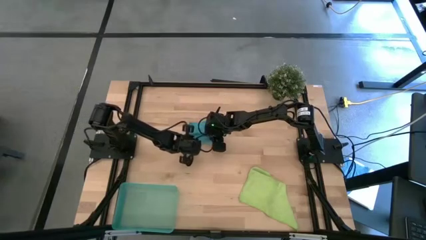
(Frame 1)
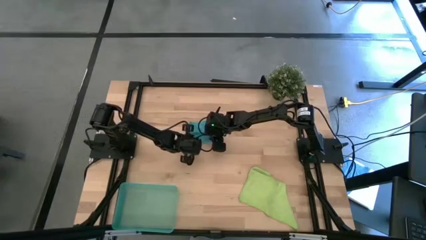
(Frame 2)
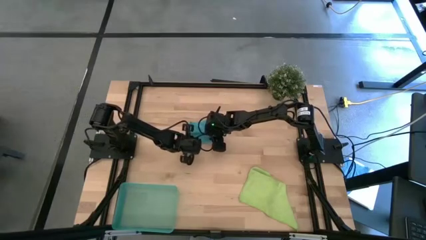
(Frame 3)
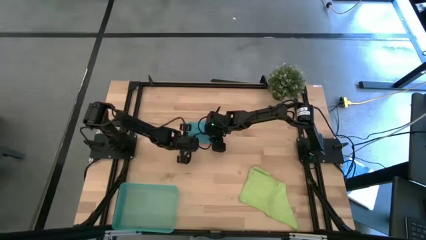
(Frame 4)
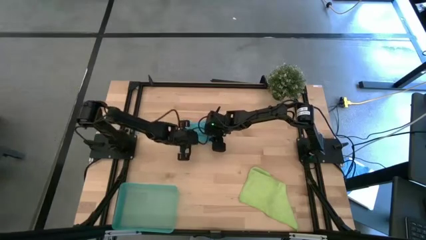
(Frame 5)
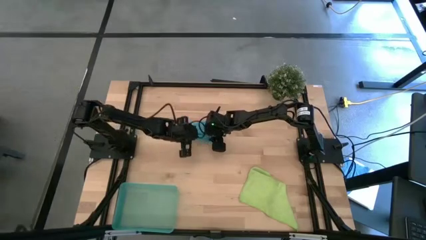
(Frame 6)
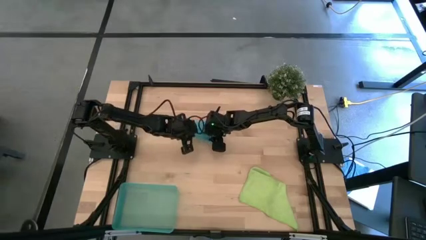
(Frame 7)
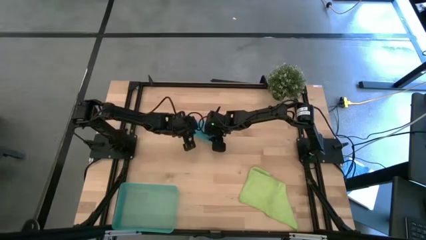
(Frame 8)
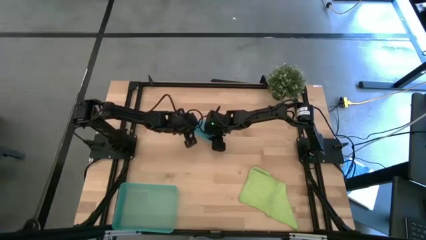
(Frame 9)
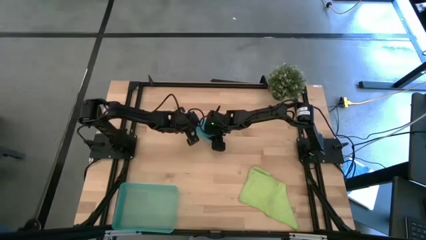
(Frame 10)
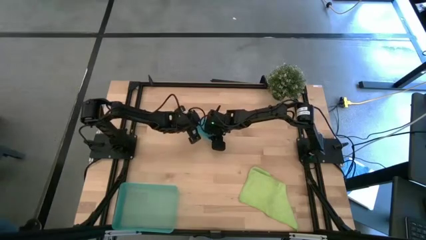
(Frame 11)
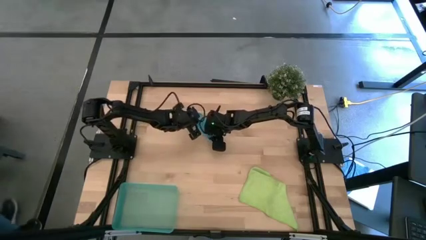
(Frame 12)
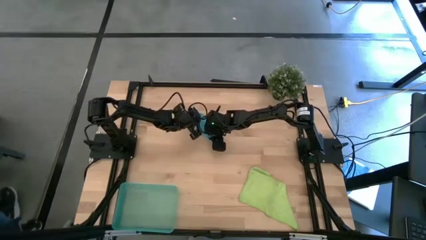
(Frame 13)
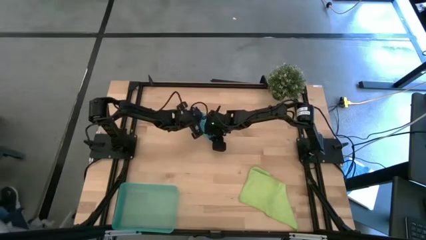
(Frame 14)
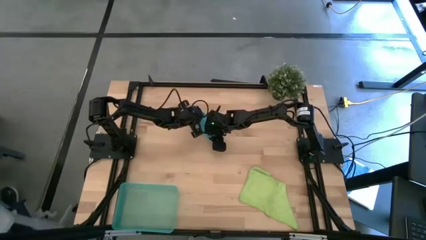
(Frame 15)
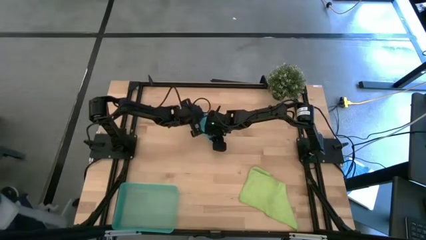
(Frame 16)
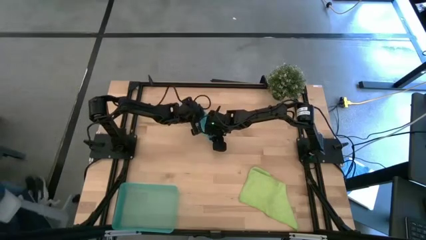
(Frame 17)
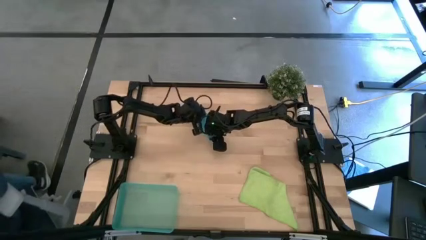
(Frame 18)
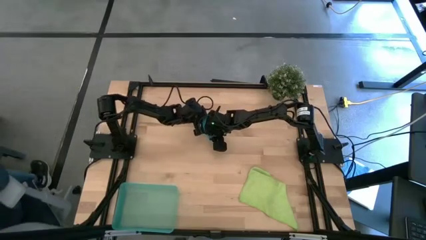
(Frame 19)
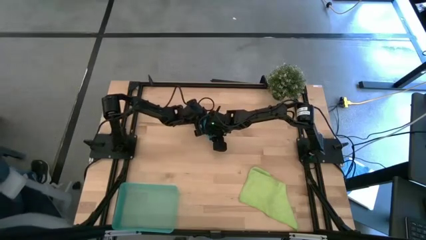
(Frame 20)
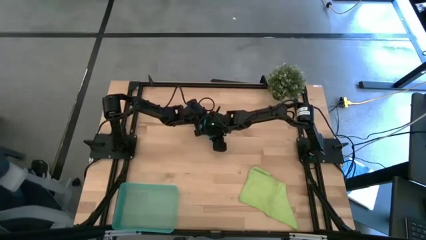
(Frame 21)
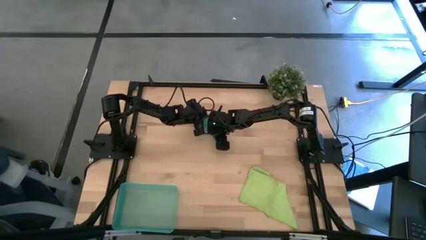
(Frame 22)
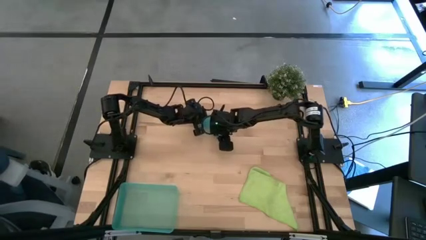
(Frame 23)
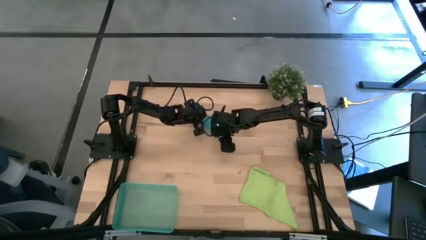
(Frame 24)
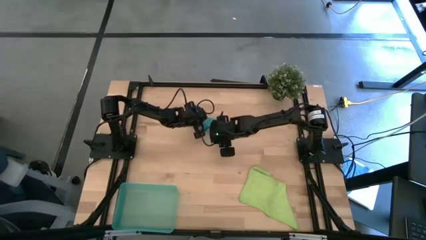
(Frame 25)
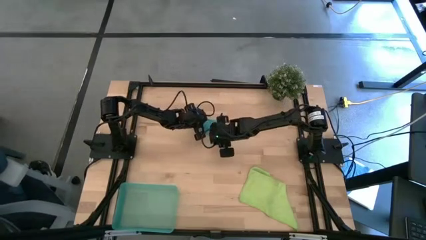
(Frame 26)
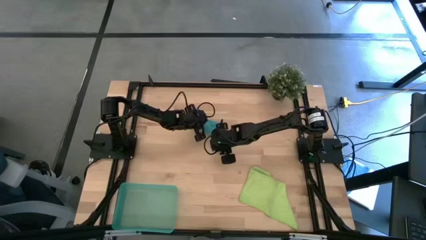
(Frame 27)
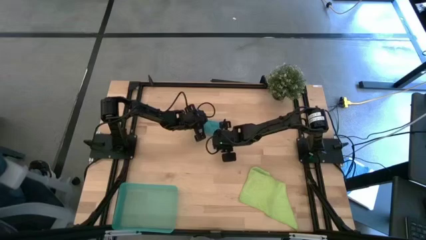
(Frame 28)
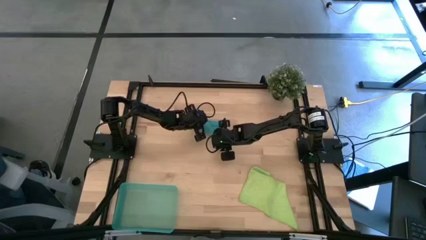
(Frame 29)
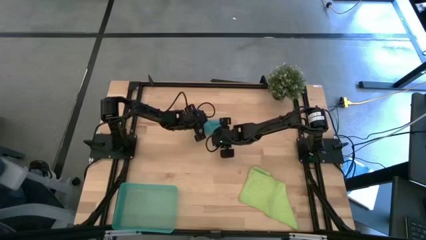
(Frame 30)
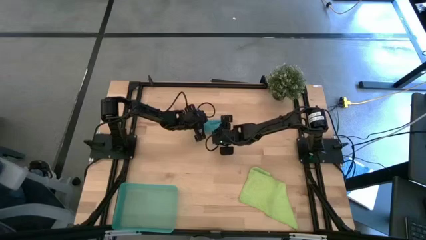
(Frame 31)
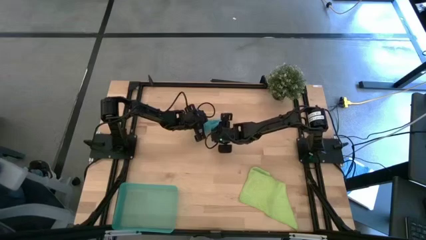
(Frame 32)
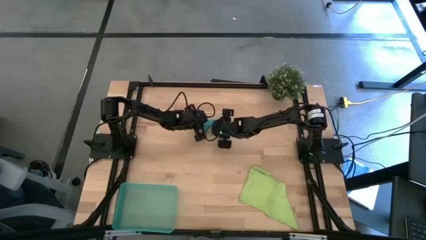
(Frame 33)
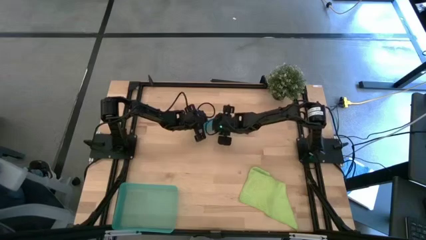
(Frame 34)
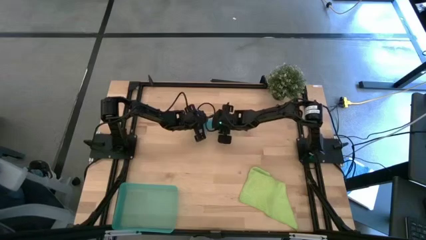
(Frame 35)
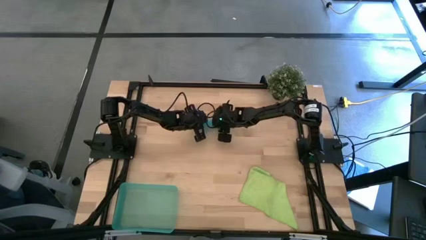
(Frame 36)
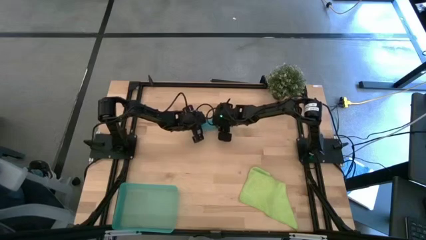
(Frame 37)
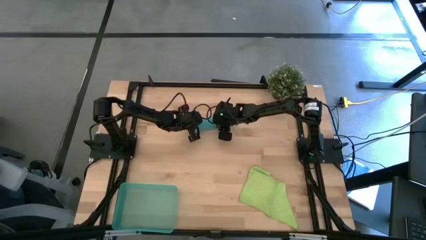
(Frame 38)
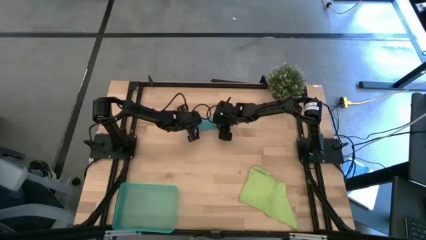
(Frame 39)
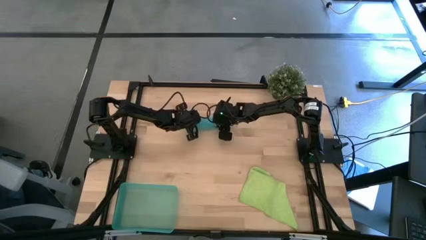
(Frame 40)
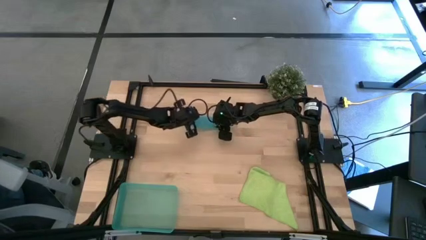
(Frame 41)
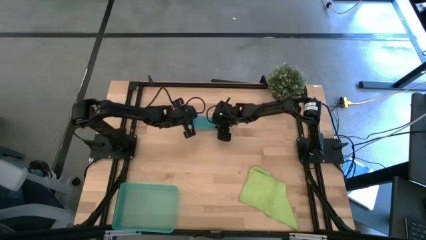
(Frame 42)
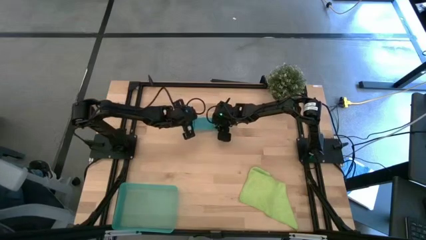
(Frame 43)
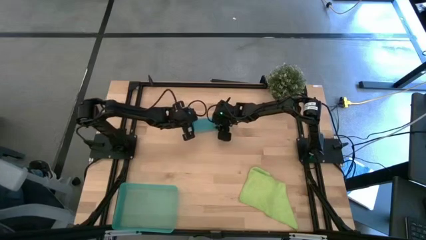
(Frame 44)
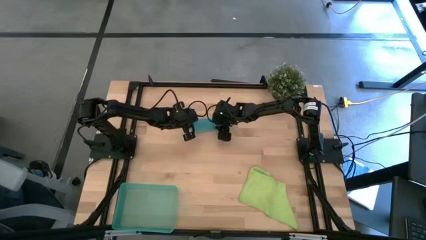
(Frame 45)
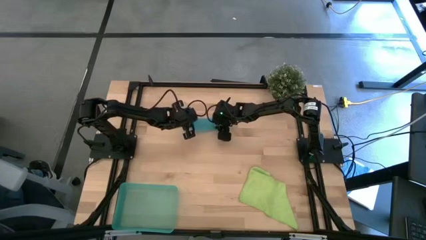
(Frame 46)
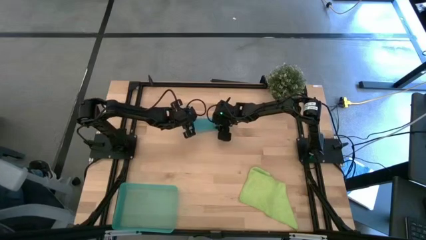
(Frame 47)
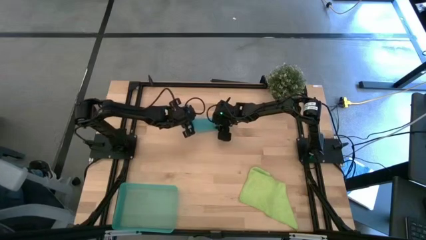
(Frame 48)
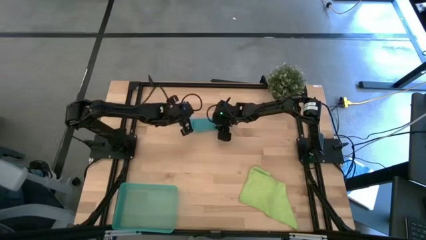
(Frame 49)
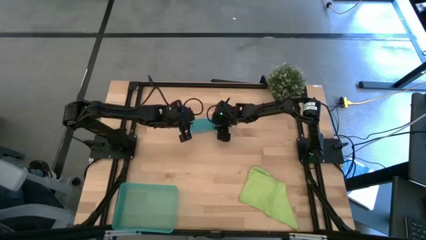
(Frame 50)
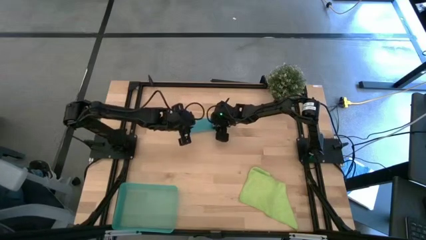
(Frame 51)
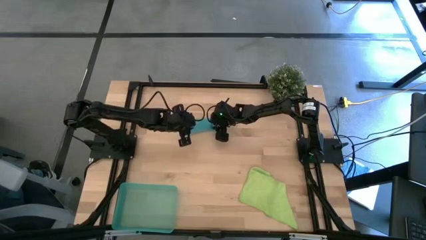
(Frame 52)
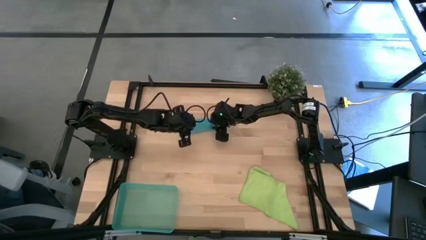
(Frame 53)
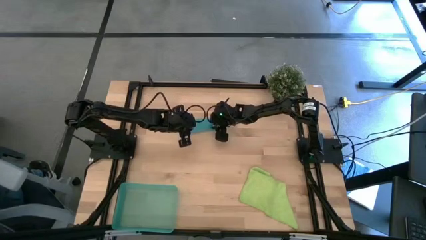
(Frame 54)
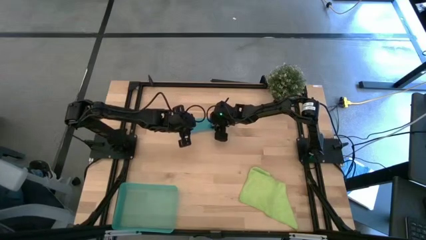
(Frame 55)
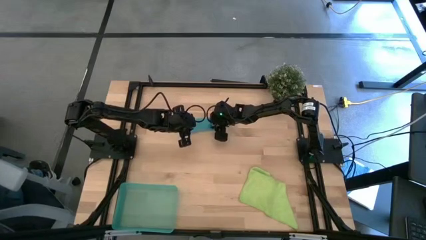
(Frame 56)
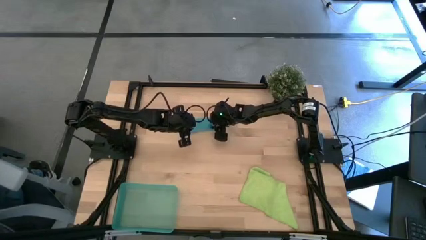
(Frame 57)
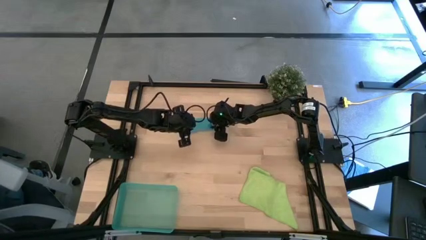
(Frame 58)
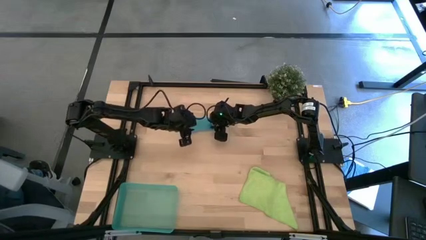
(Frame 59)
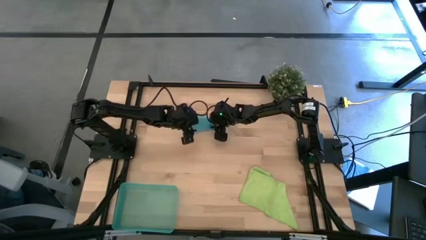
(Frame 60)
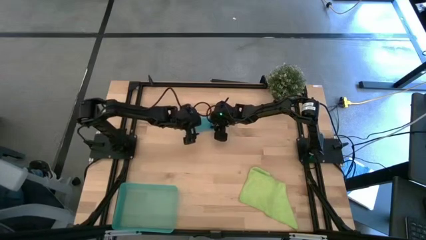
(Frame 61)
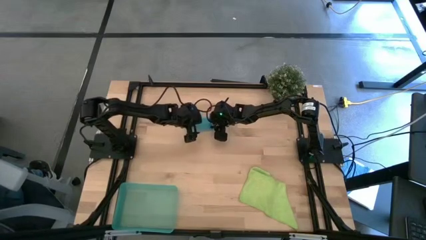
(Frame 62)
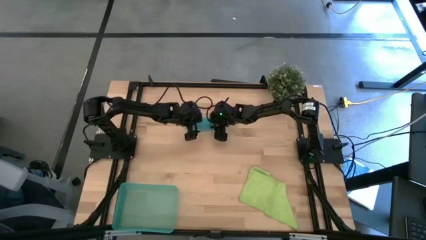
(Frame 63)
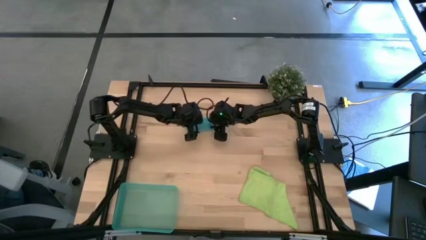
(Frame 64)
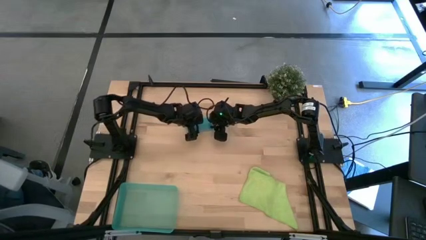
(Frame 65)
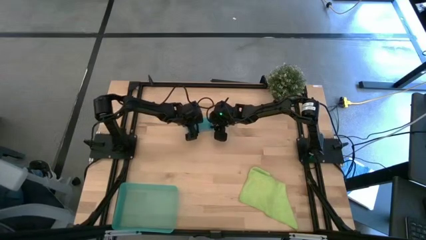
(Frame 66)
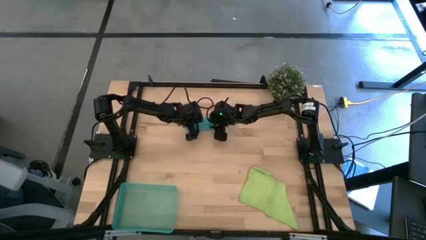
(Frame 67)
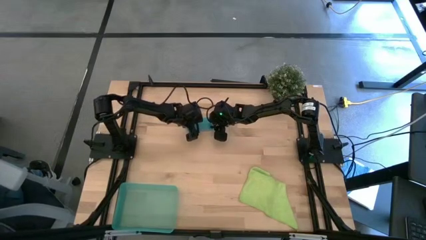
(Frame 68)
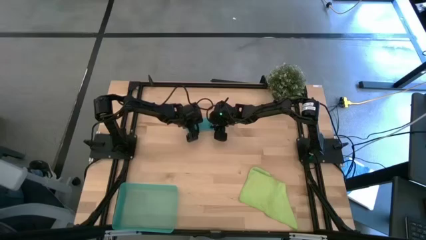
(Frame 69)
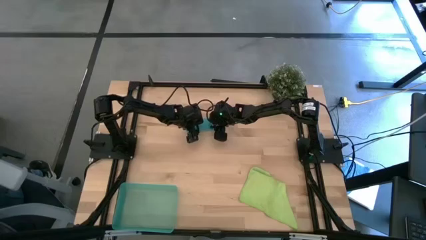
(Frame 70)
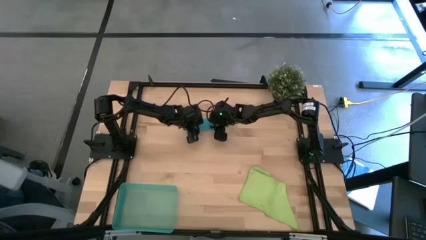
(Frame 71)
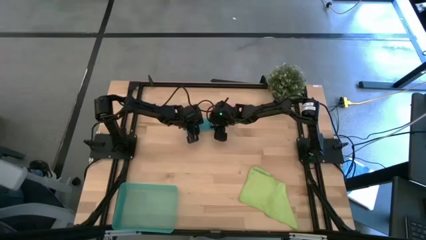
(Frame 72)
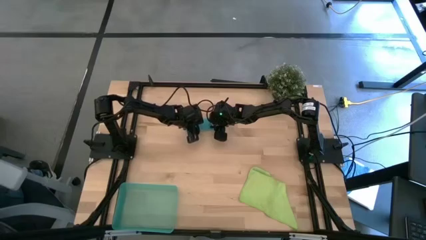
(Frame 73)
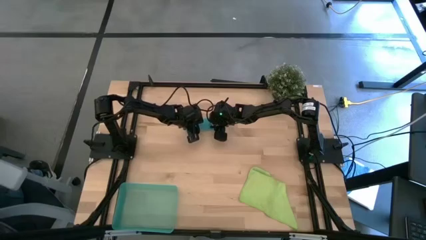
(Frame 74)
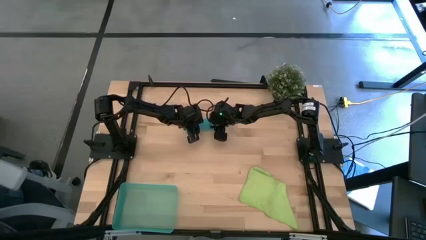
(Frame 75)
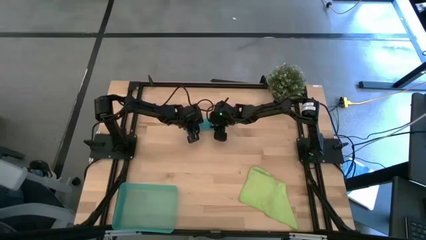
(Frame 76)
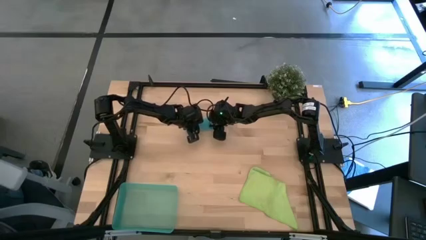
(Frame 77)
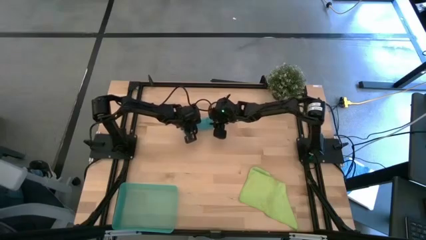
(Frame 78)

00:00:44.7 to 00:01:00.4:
Task: Roll microfiber towels into tight, uniform cylinder then place into a basket
Roll the blue microfiber towel
